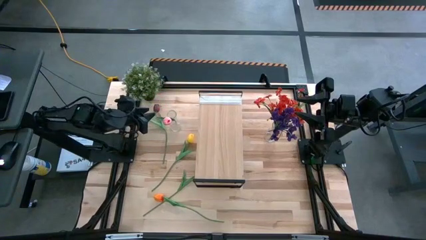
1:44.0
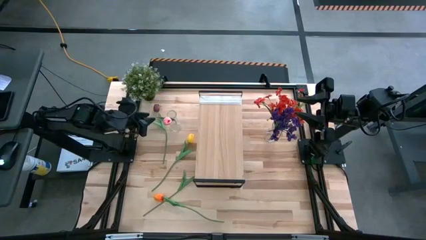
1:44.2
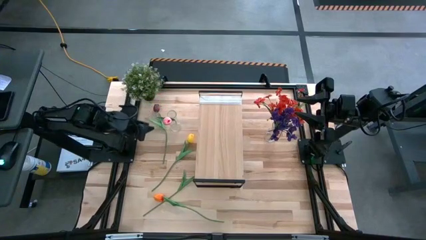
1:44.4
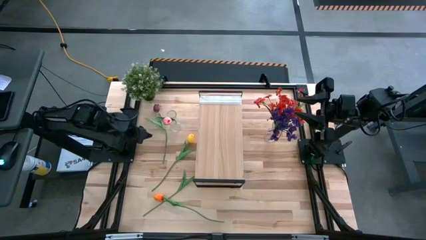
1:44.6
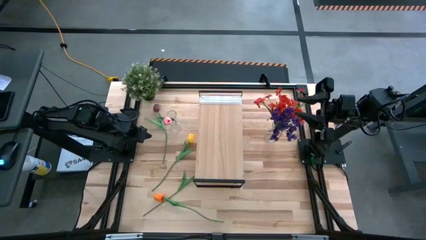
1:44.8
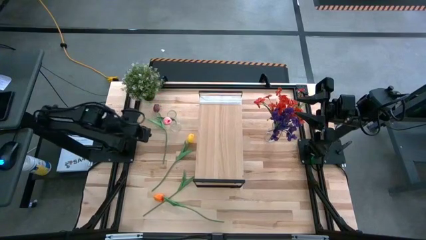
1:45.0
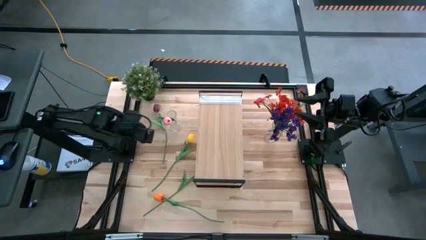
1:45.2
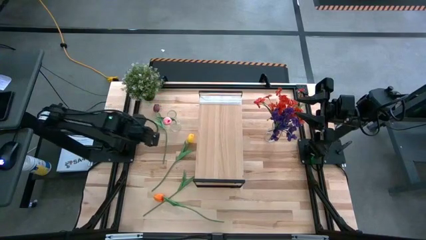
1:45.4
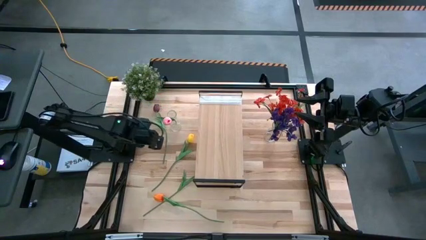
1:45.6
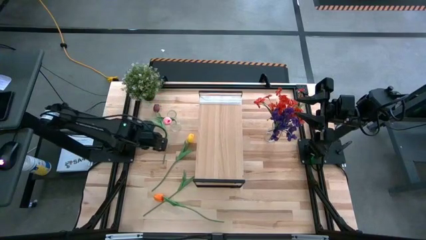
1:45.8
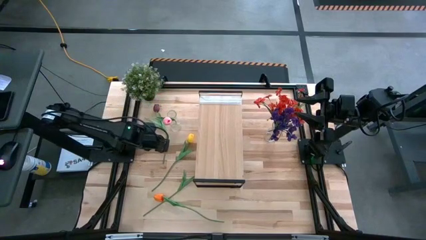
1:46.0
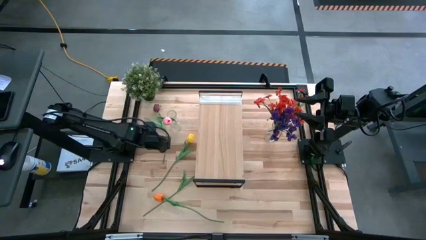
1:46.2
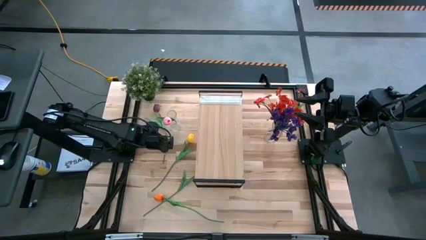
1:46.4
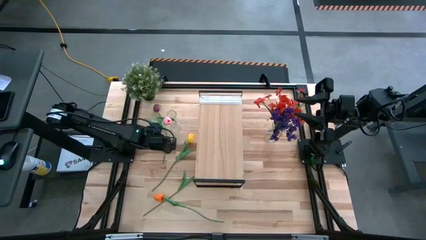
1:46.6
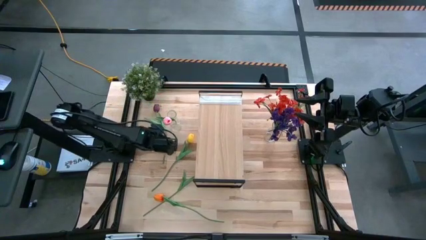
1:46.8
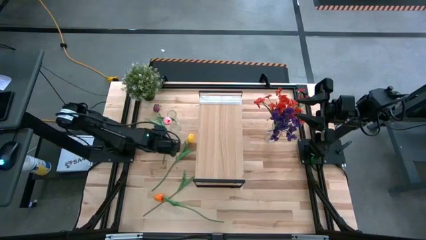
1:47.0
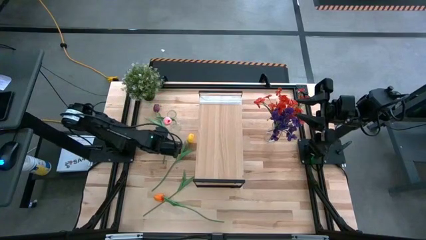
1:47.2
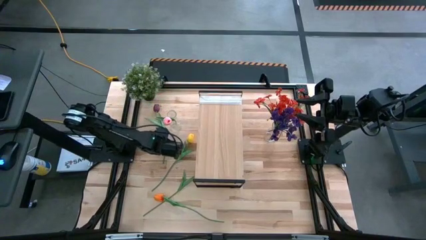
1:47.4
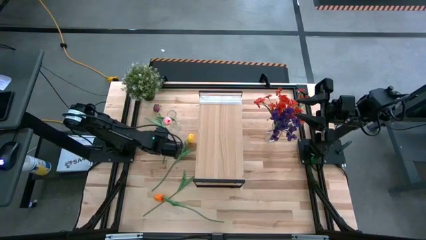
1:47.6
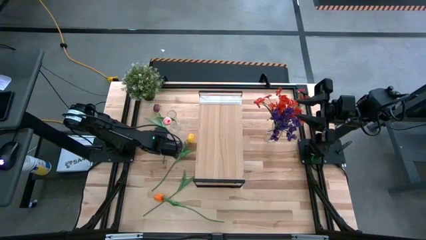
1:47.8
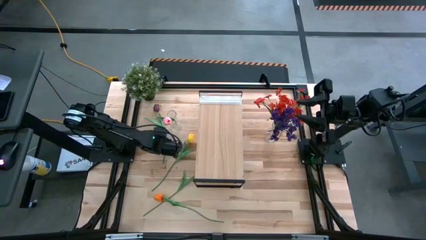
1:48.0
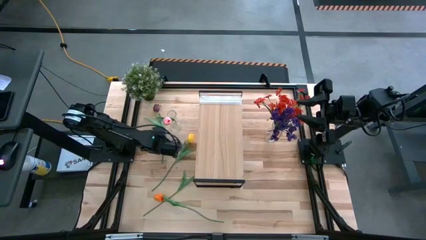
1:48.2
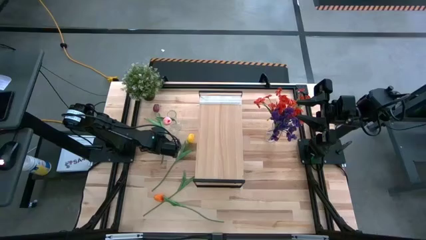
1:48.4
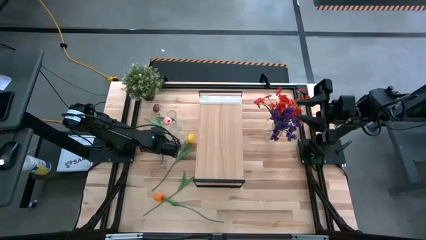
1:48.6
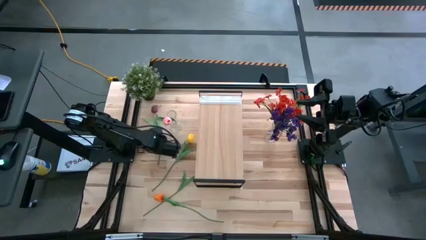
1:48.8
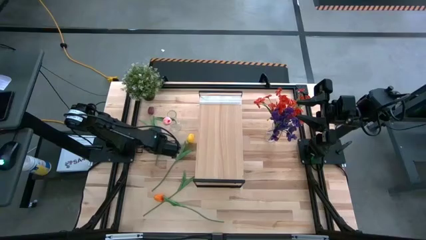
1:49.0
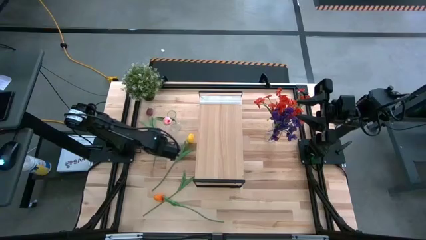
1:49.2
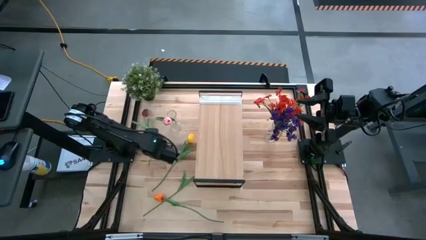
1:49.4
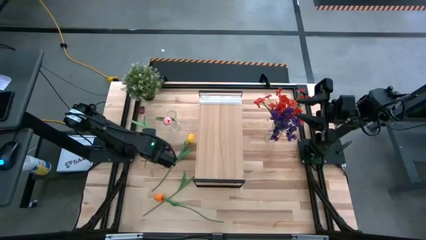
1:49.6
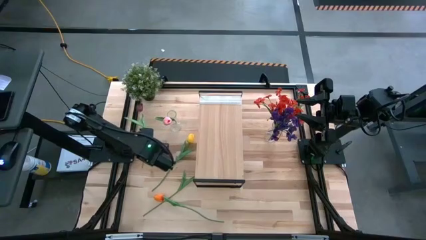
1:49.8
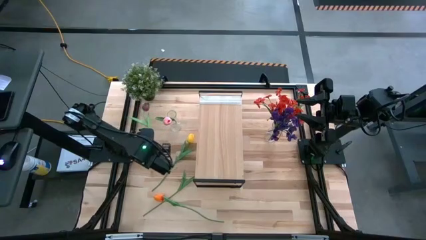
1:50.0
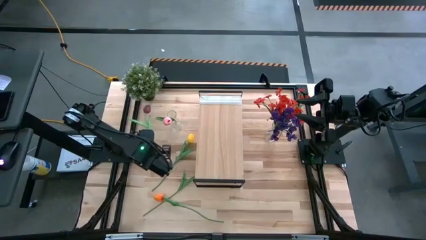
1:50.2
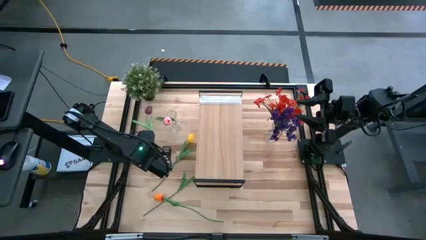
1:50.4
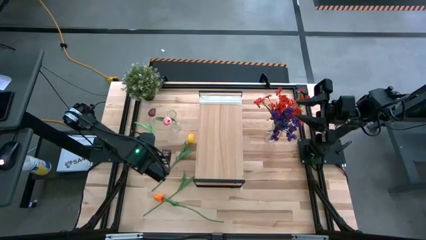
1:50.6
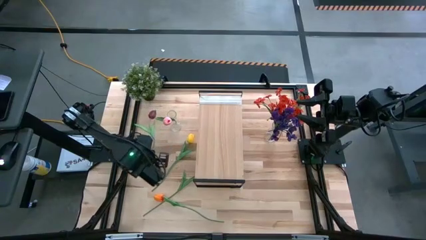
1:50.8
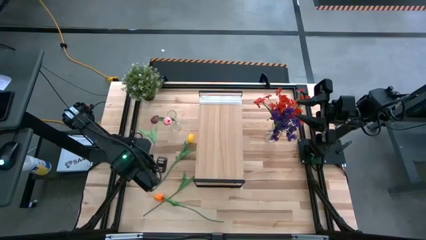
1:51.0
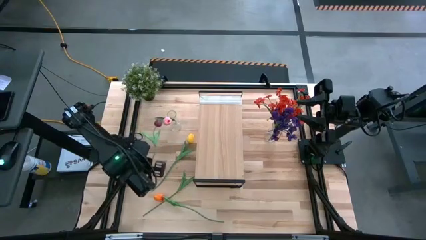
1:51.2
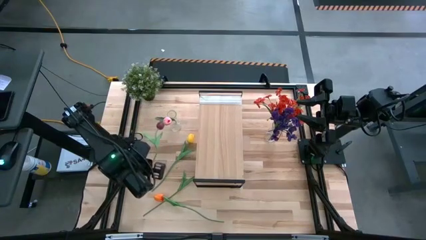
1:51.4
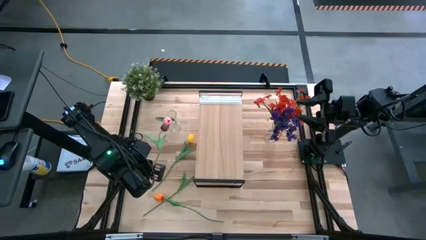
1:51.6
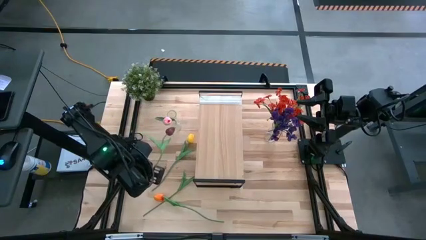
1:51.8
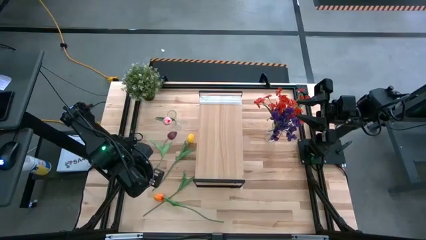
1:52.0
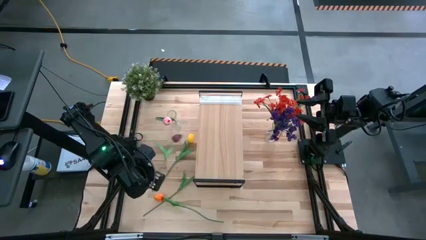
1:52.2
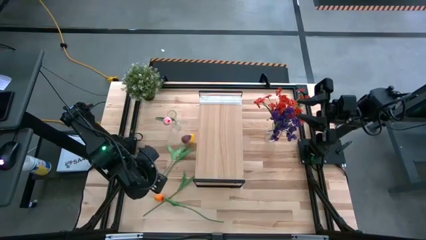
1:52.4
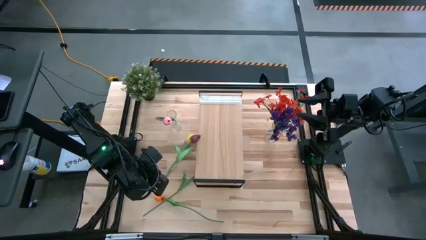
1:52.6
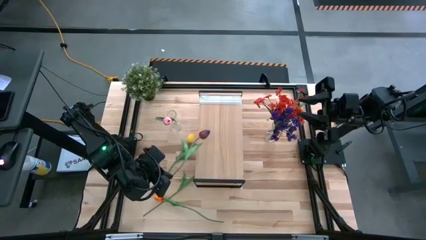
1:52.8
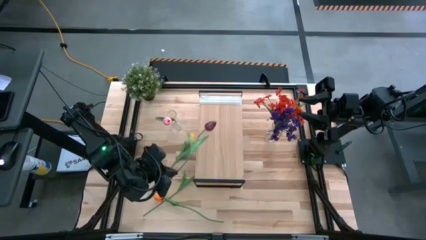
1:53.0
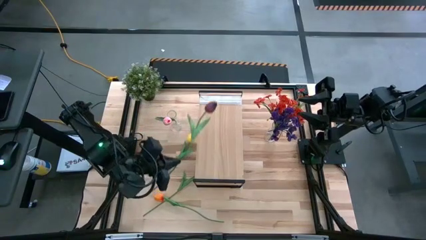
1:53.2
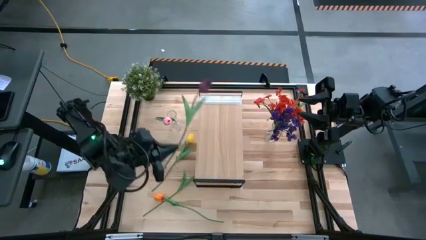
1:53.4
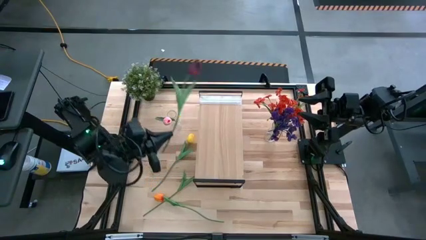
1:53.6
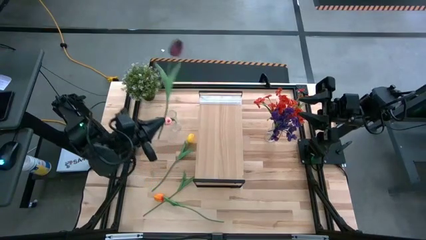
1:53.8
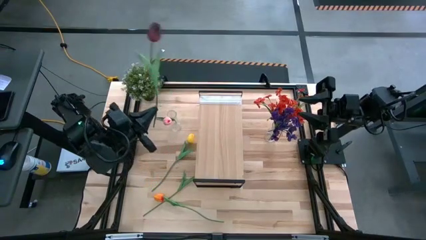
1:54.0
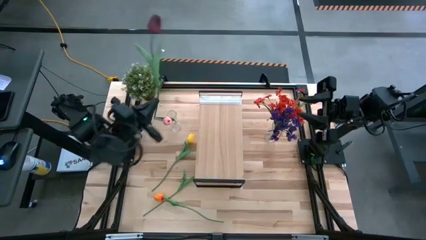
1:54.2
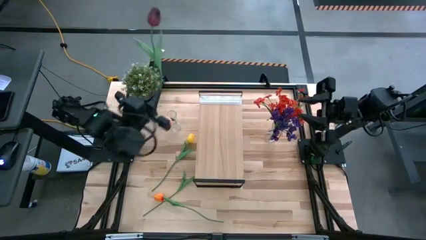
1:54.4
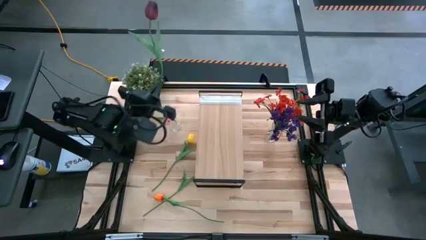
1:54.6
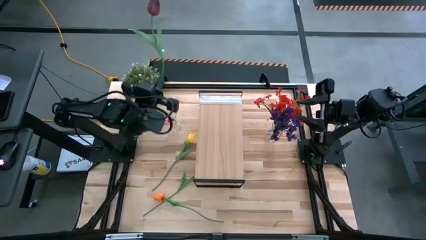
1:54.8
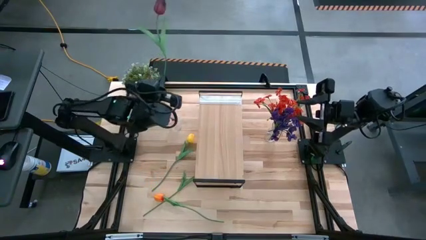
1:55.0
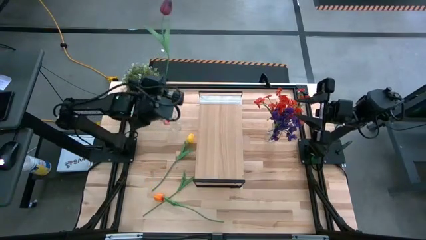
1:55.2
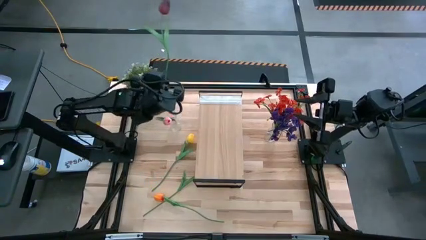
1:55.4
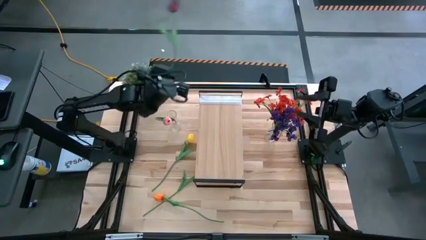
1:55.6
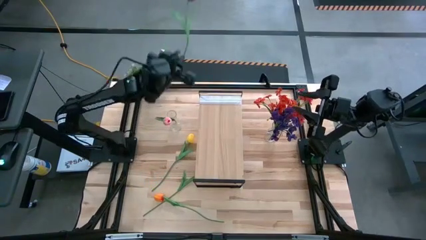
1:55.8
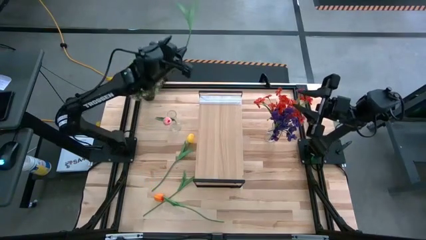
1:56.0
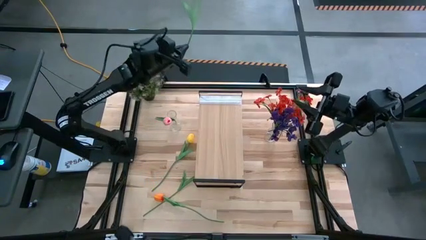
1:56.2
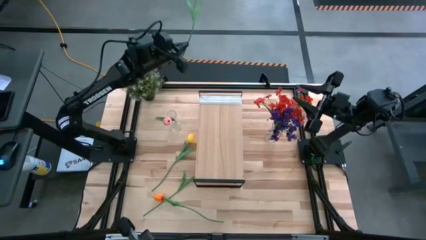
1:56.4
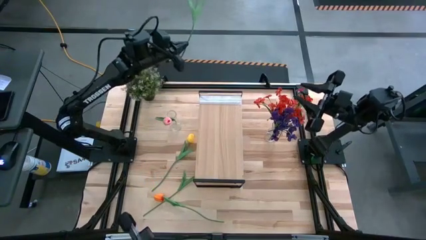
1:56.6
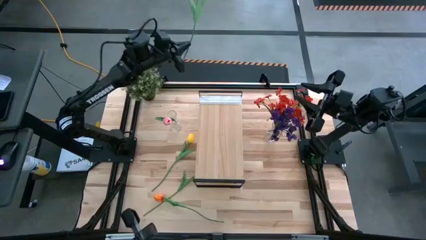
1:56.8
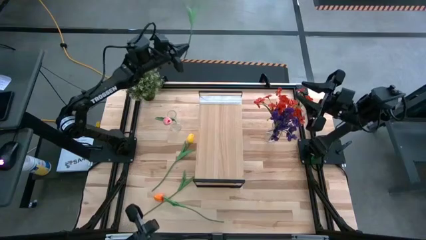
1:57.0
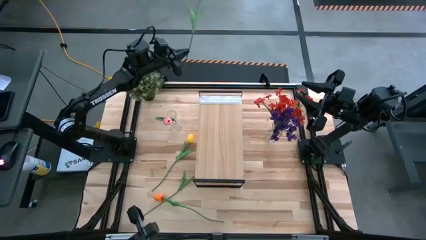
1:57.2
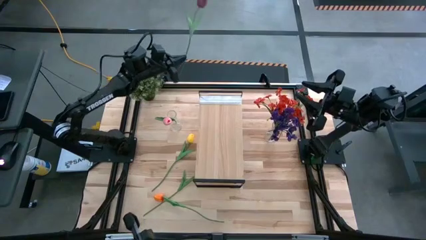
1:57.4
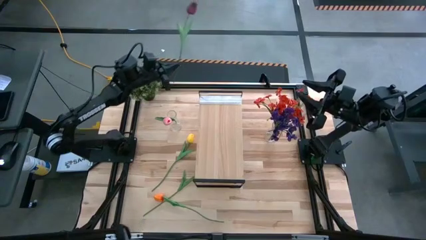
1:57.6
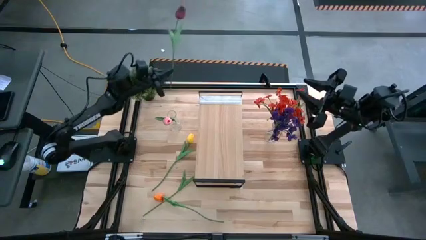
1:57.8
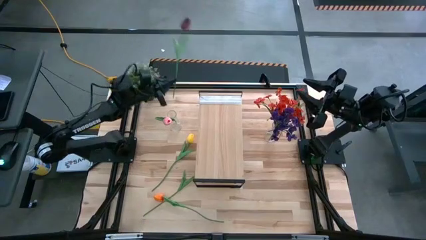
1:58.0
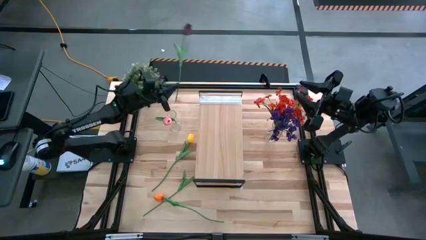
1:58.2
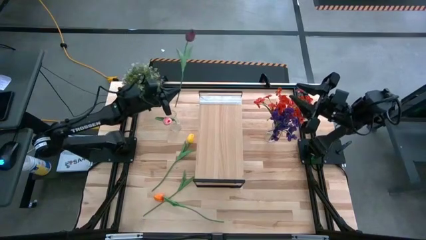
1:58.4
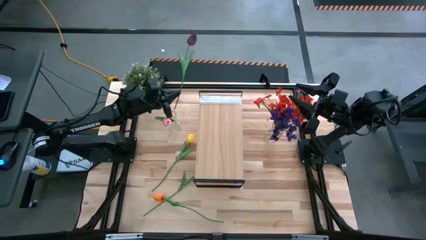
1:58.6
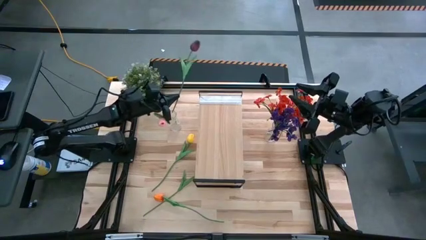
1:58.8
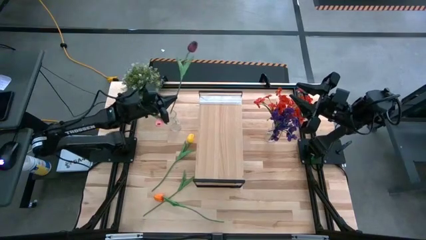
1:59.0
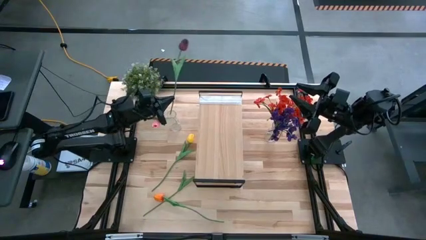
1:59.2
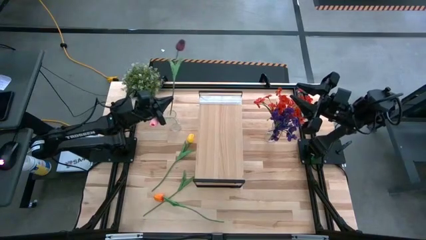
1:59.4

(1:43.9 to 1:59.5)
Task: Pick and place flowers into a vace then onto a shelf
Put the dark red tulip into the left transparent vase

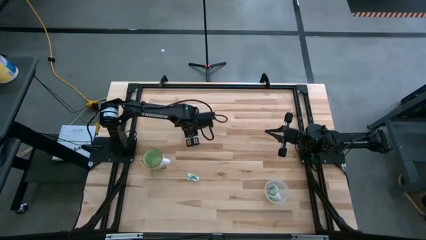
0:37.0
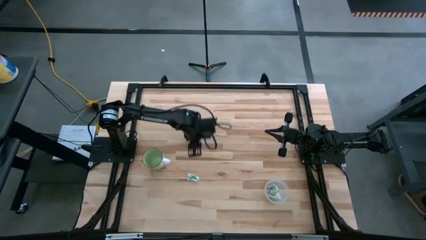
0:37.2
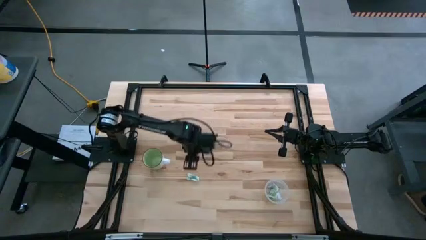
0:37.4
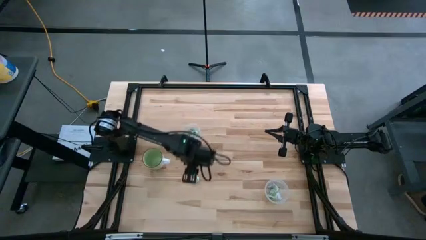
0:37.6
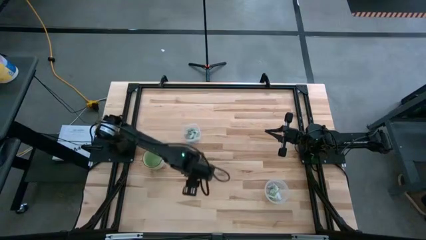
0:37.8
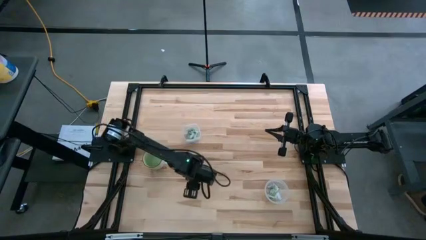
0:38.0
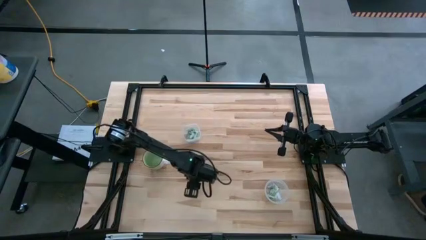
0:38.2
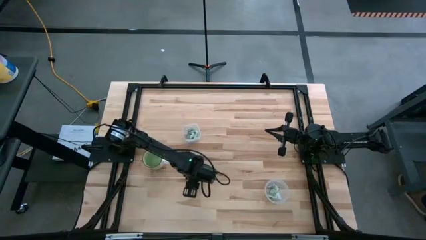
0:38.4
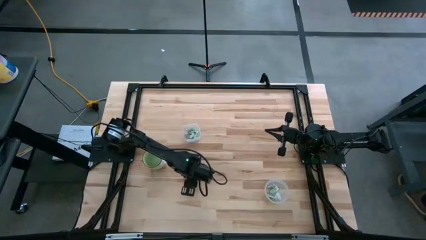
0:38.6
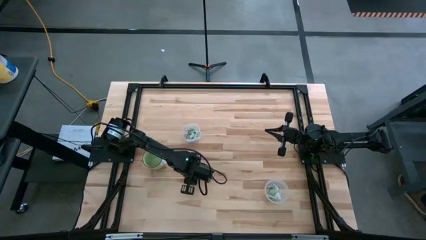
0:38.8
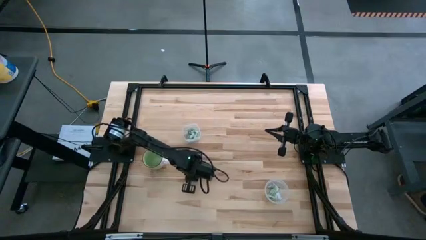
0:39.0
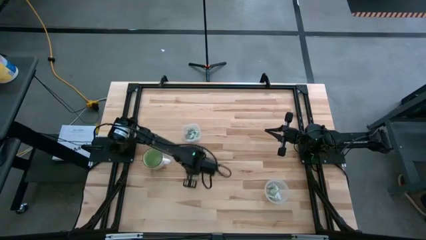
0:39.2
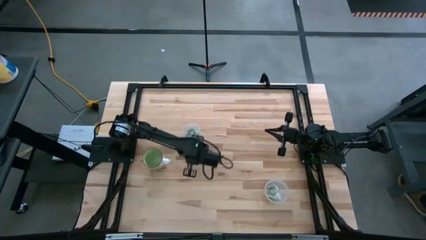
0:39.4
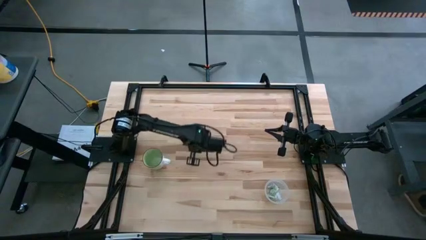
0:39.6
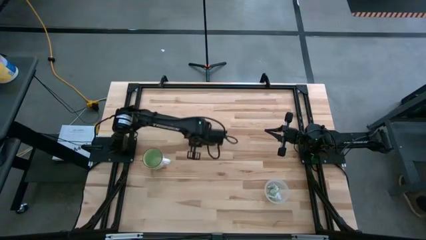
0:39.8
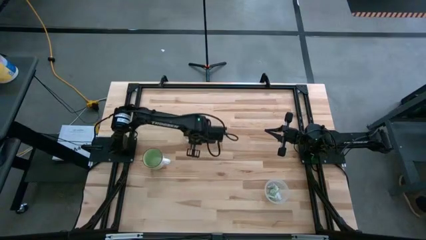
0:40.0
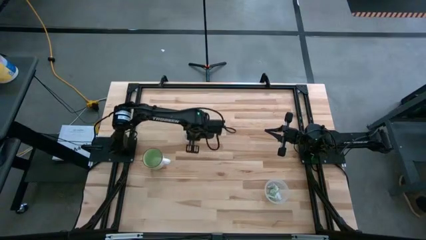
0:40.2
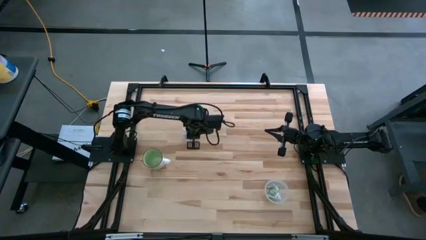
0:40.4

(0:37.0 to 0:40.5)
Task: Pick and place items into bin
Put the green stevia packet into the top transparent bin
